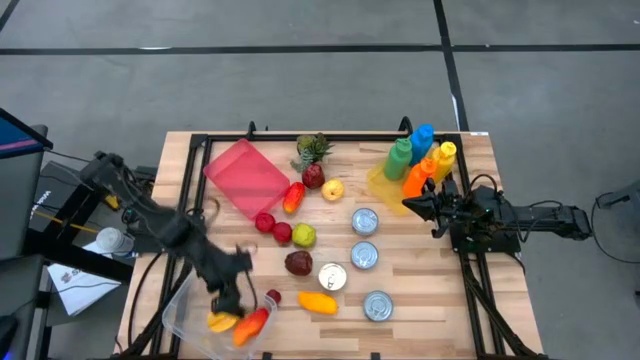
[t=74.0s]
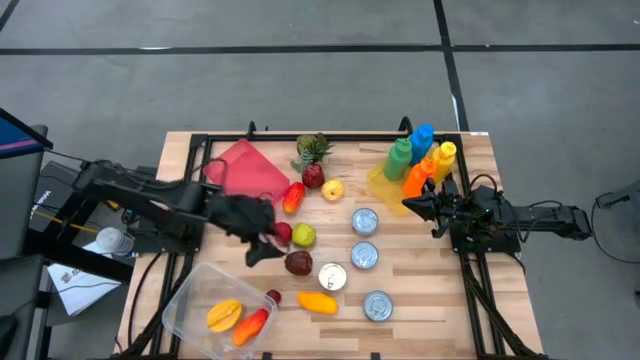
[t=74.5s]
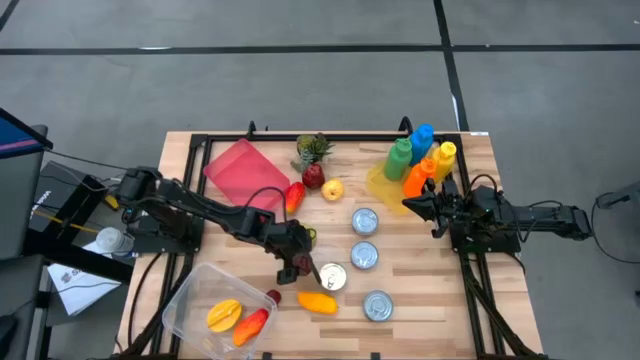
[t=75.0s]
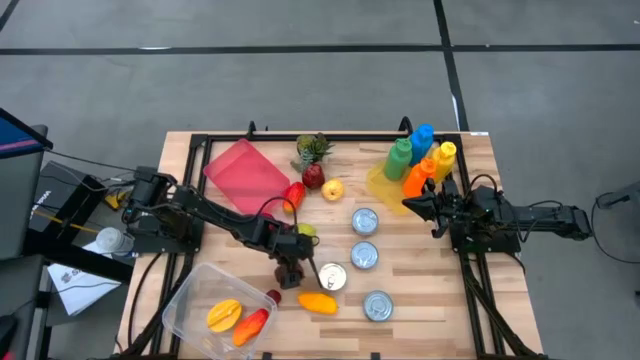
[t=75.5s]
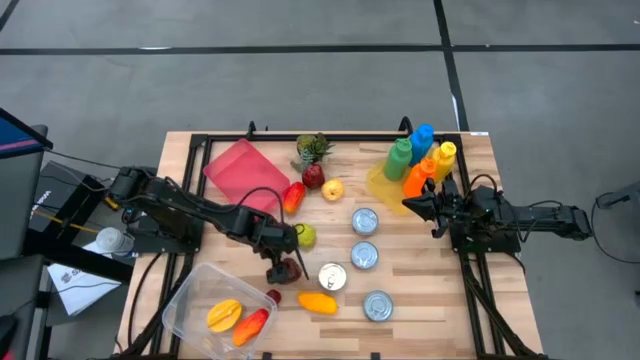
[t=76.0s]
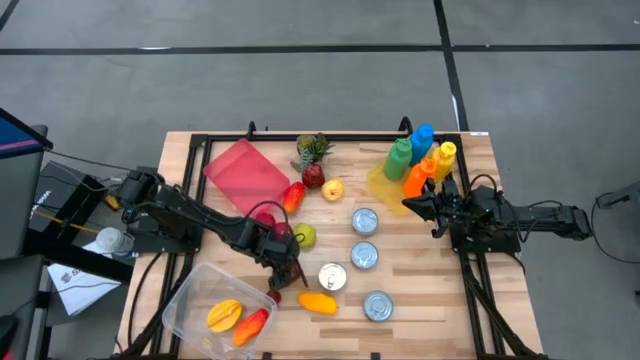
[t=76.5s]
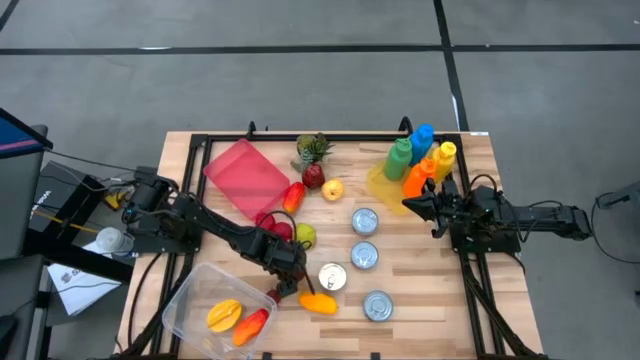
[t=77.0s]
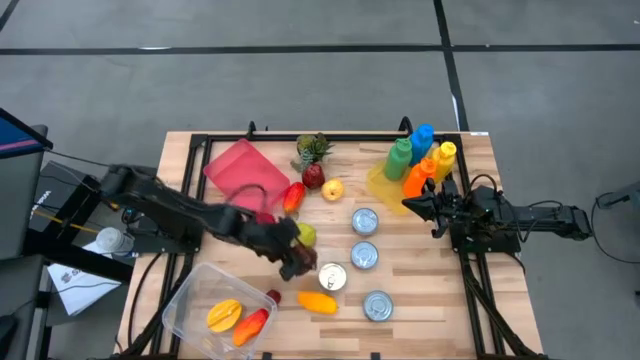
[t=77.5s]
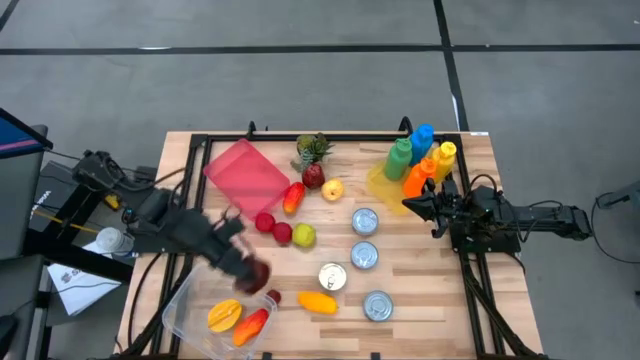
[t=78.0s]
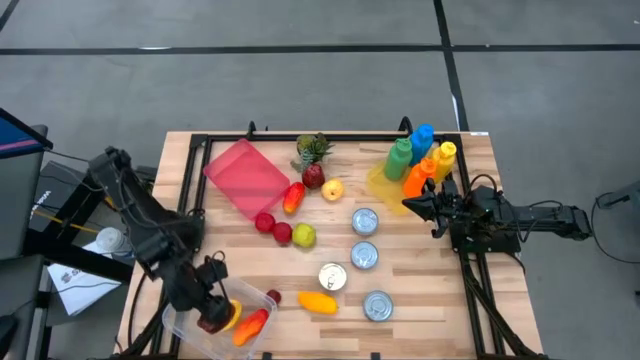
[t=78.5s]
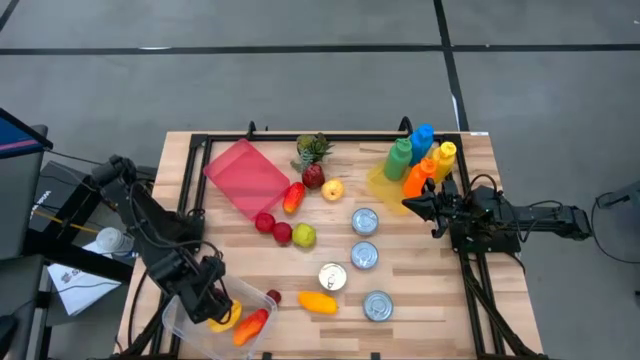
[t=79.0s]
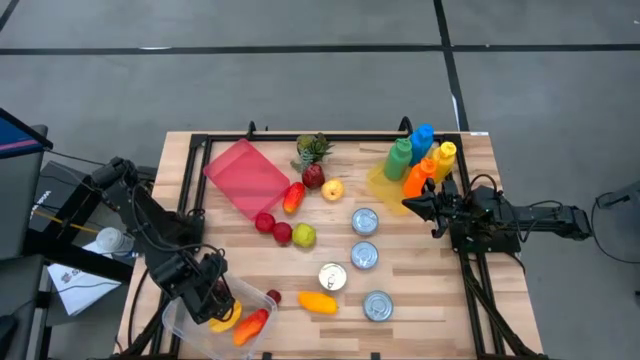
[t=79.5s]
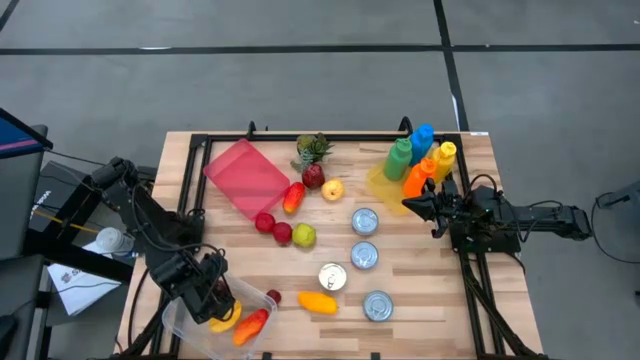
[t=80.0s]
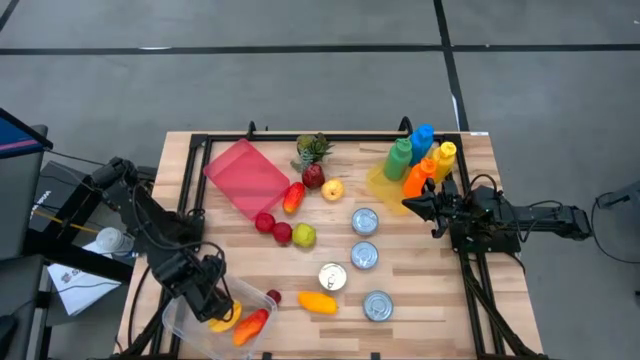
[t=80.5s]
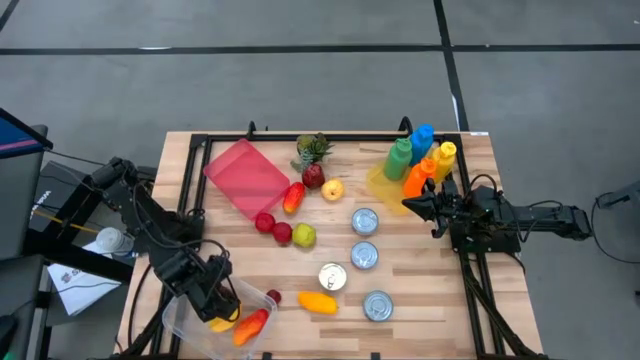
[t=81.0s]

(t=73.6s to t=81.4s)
Task: Pick & Place Food Item
Put the bottom dark red apple into the transparent bin

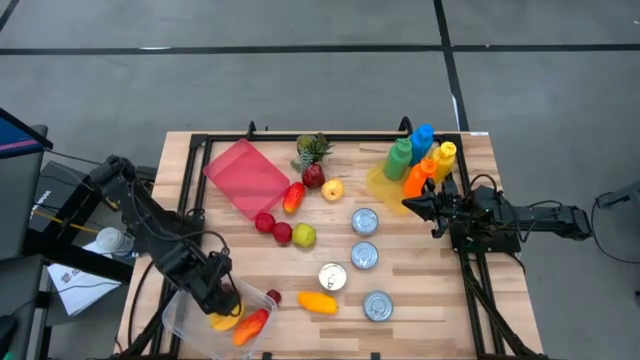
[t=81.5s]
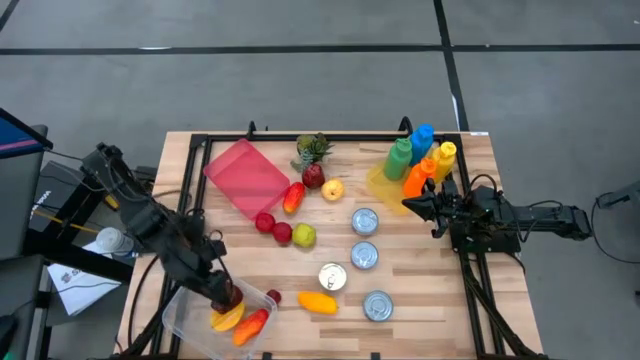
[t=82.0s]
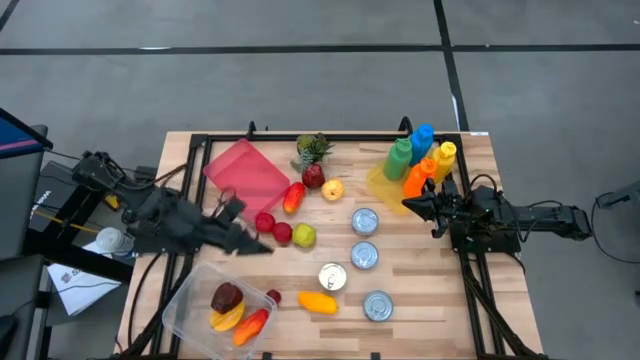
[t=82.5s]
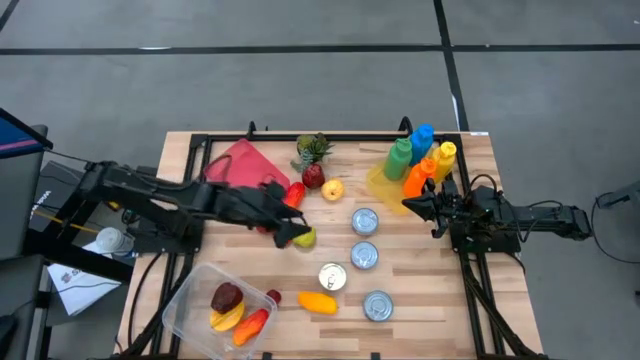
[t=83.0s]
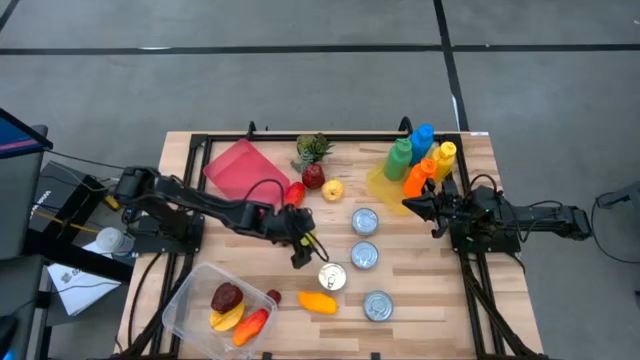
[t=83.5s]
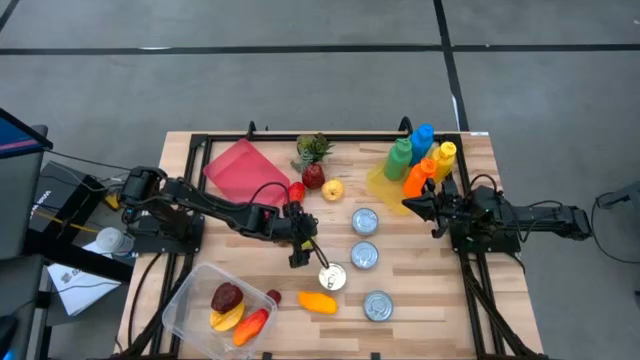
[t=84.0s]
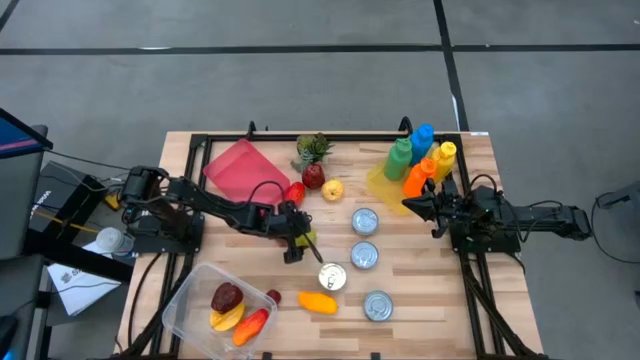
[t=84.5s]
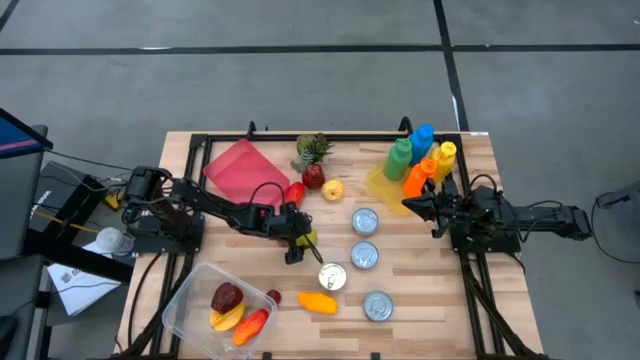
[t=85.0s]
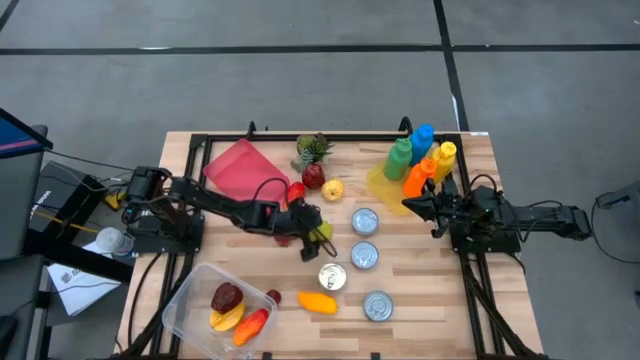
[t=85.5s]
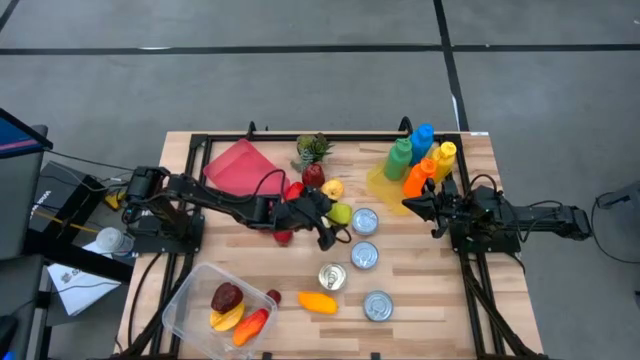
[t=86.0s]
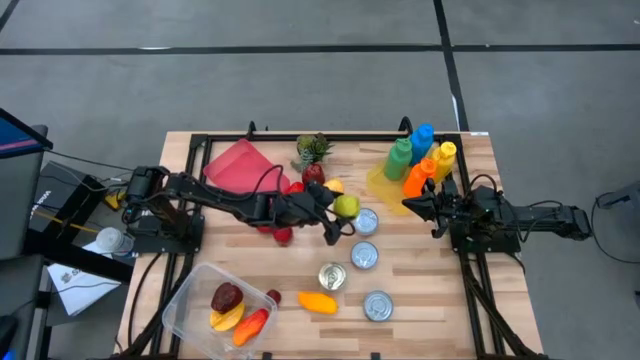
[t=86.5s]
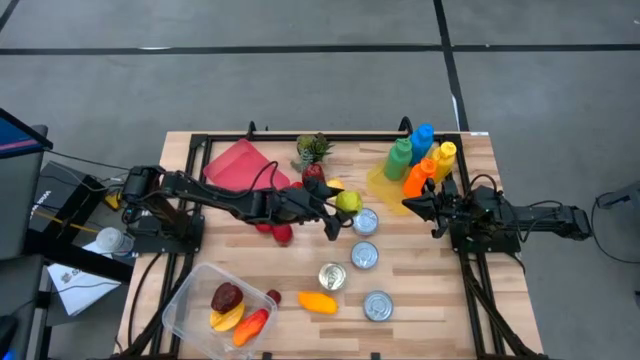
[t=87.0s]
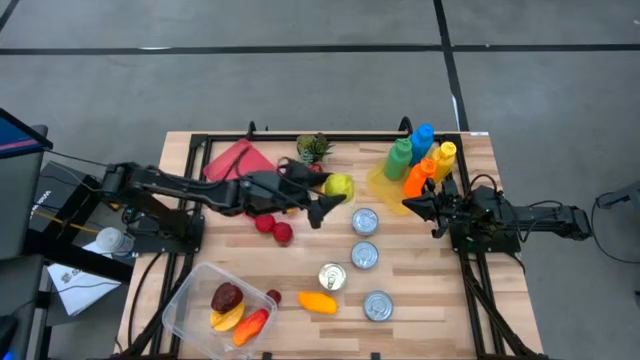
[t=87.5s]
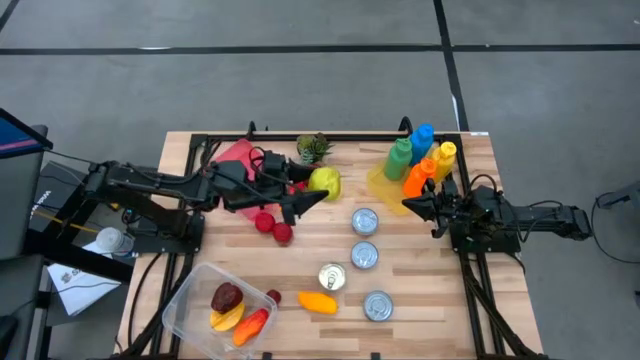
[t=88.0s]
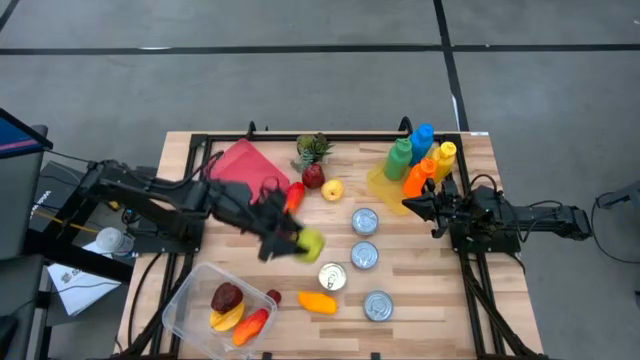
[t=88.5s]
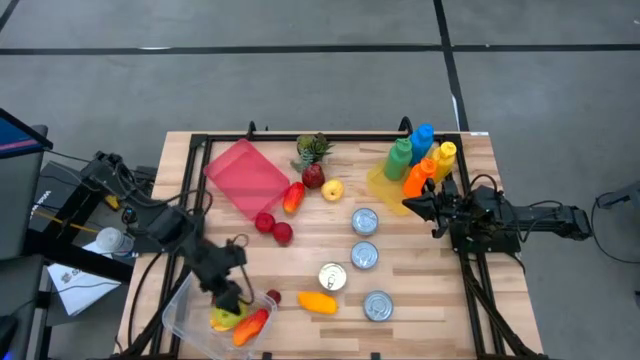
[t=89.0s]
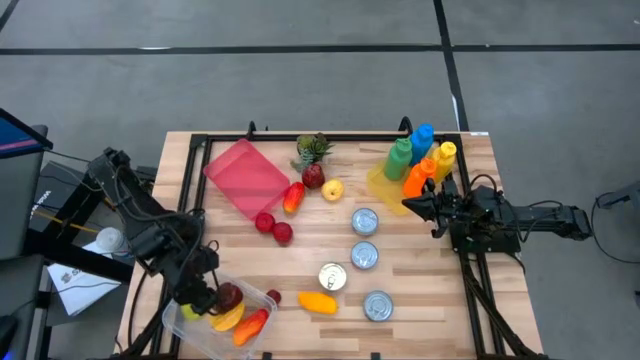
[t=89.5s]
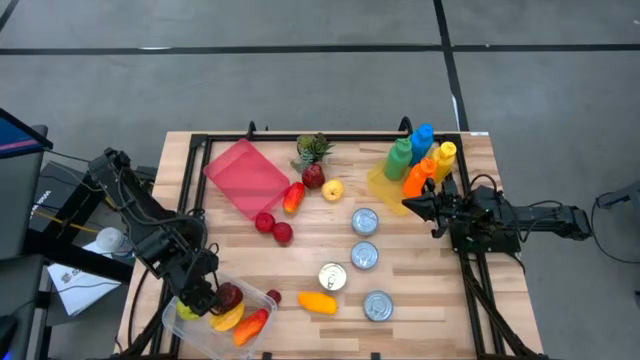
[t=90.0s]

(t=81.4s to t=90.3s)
Put the green apple into the transparent bin

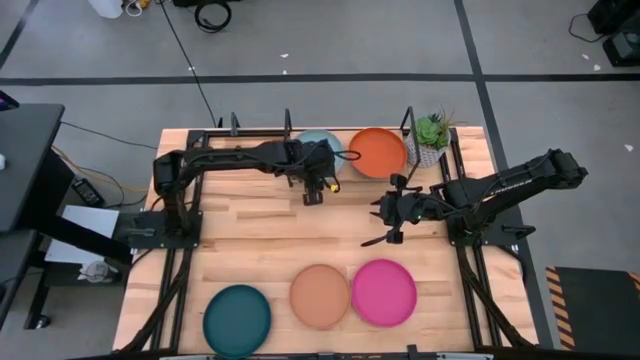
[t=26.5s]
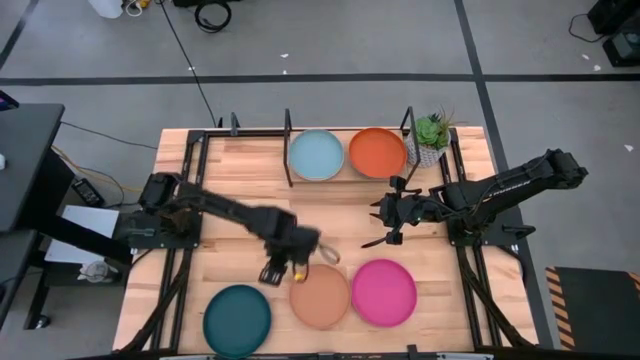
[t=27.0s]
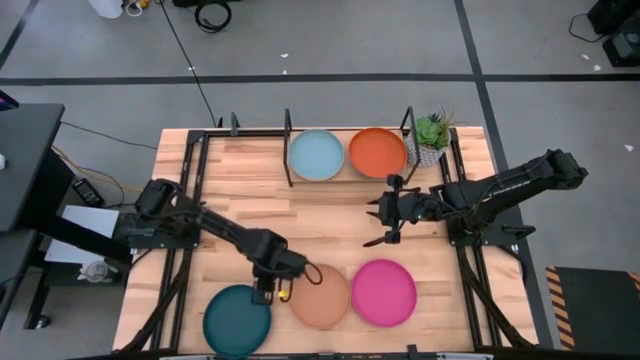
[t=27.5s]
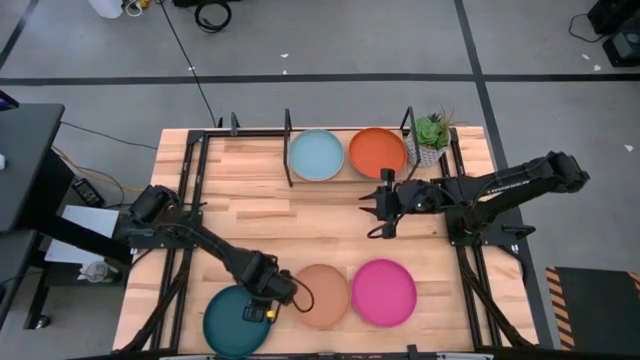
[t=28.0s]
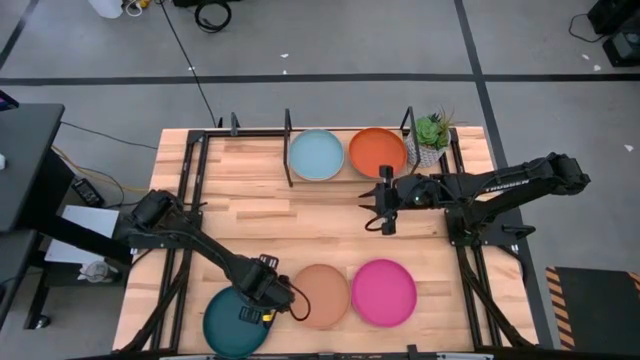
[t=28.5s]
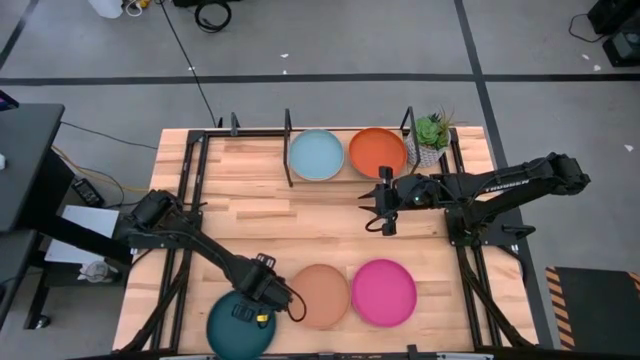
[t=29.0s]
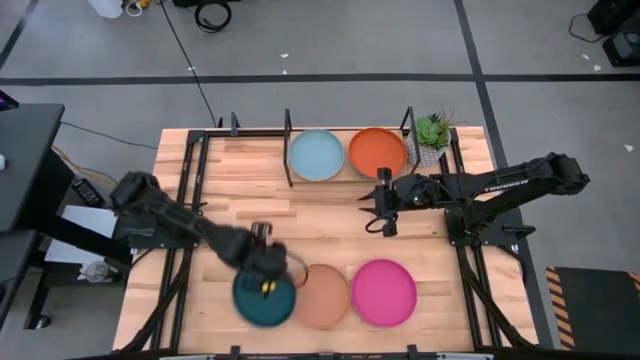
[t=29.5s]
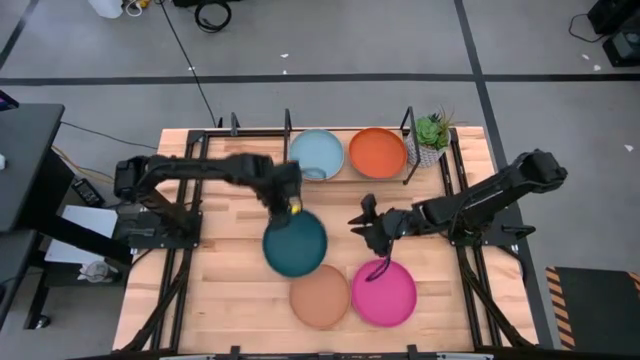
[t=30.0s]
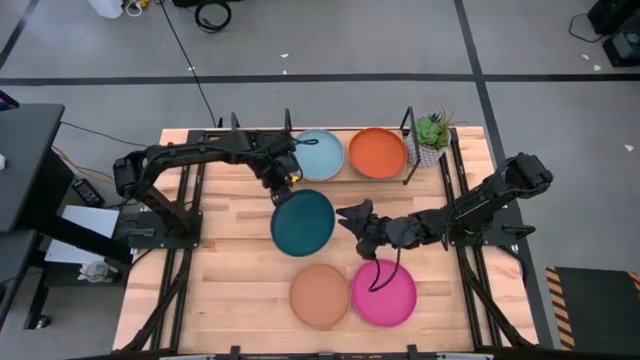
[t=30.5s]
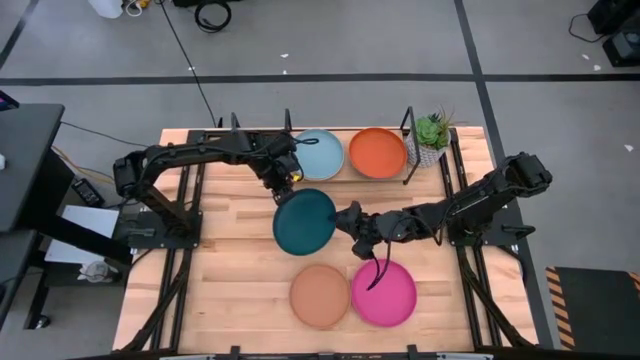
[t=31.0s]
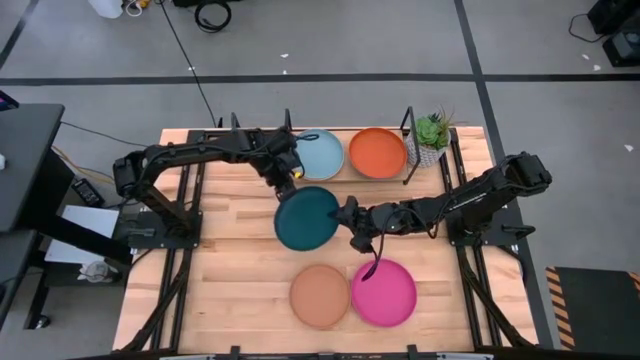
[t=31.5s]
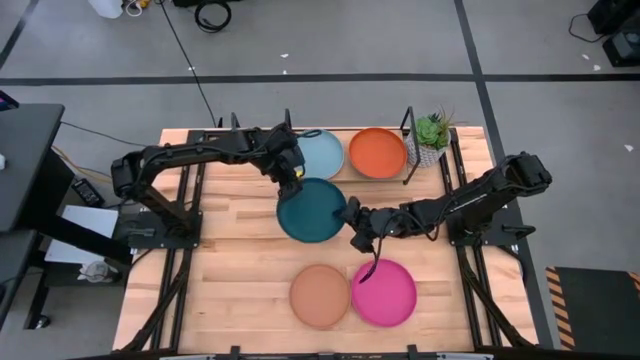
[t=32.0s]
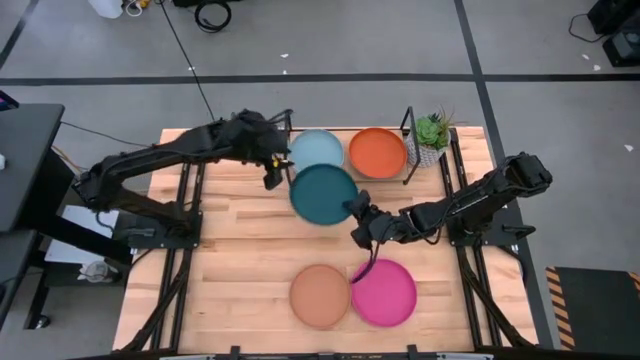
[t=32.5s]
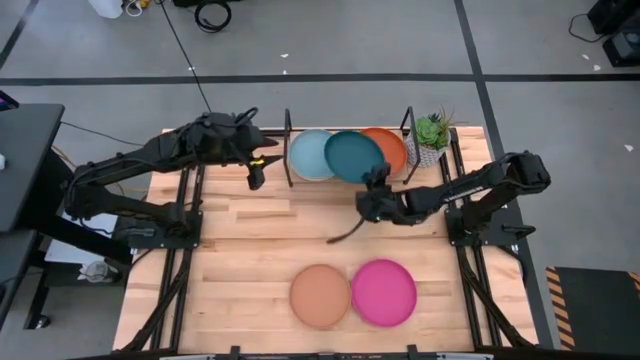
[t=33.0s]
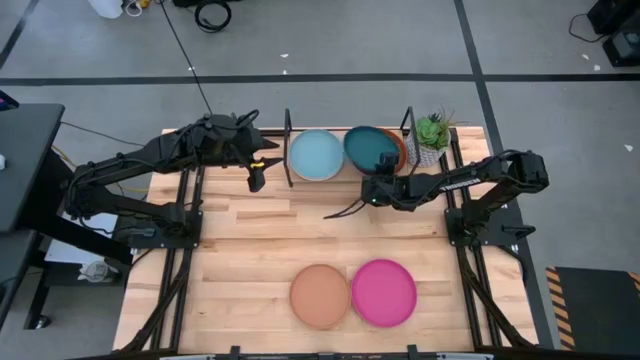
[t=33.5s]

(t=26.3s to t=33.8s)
Task: Place and stack plates onto a shelf
Stack the dark blue plate on top of the orange plate on the shelf
